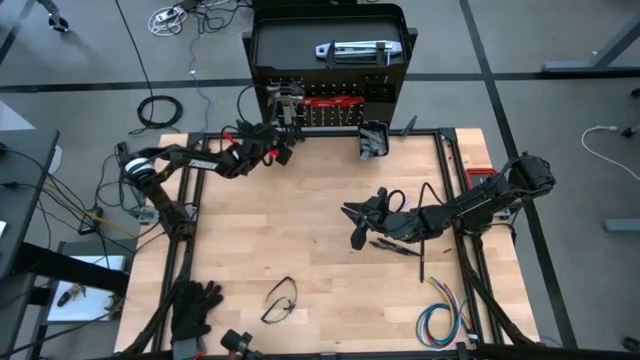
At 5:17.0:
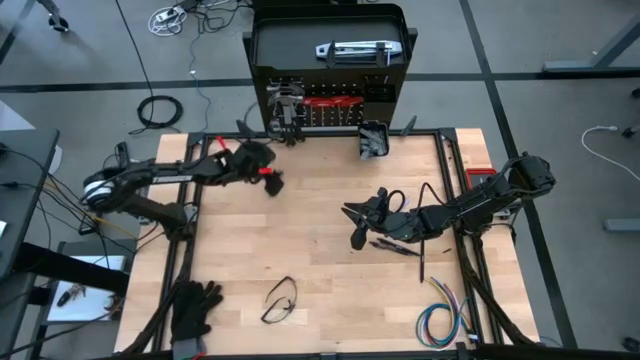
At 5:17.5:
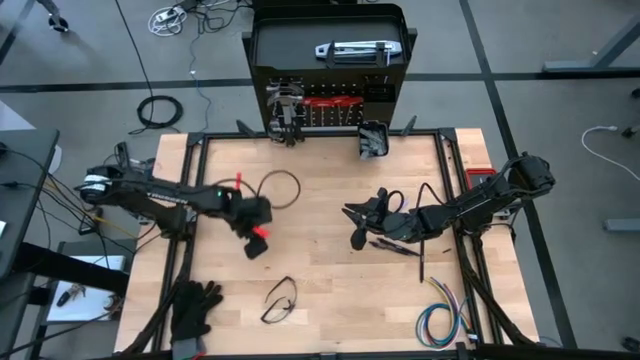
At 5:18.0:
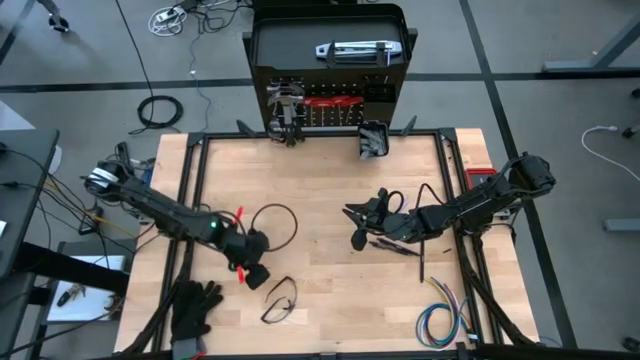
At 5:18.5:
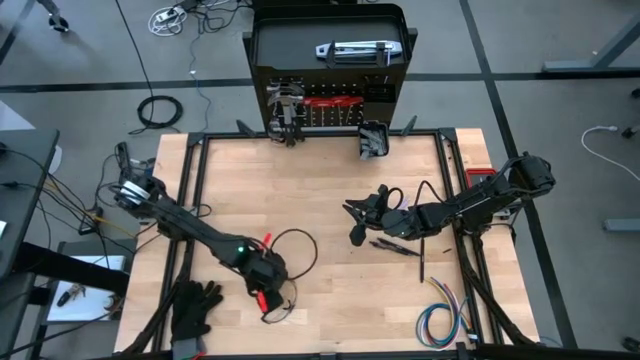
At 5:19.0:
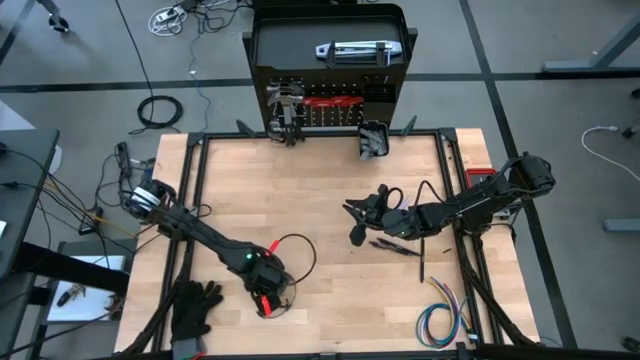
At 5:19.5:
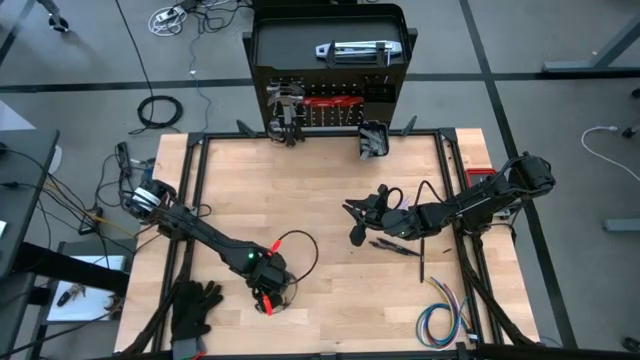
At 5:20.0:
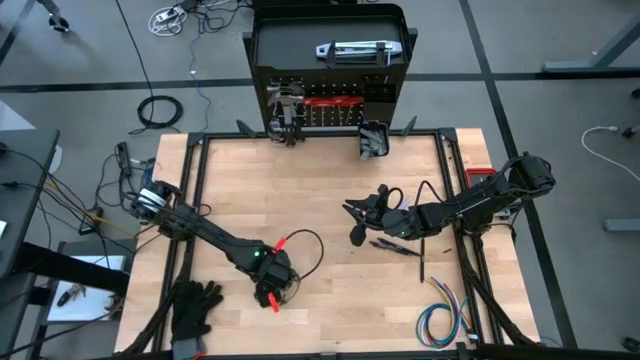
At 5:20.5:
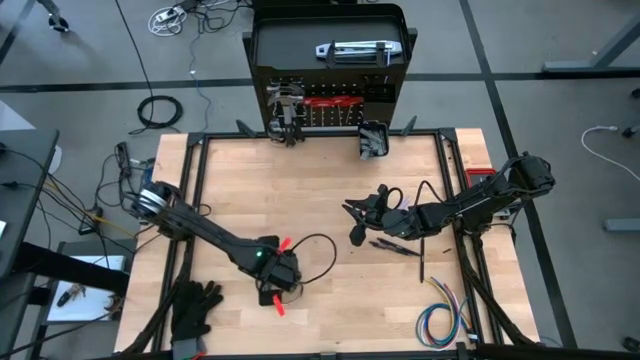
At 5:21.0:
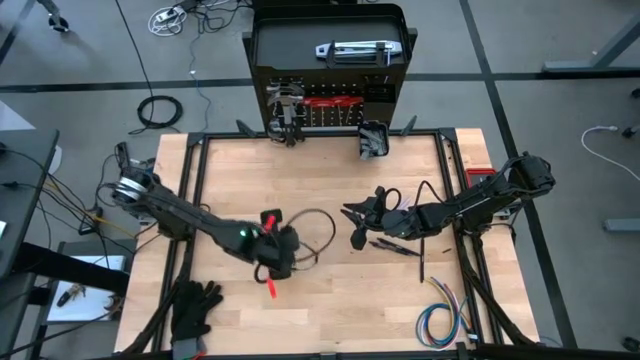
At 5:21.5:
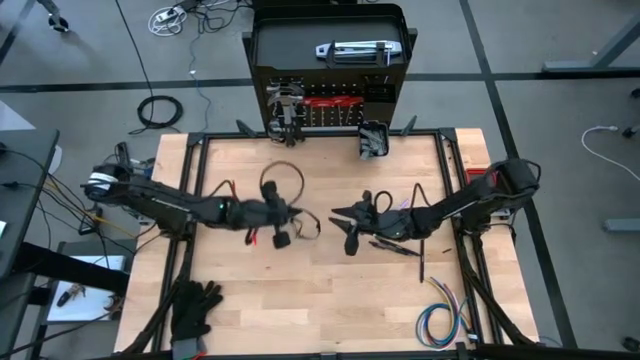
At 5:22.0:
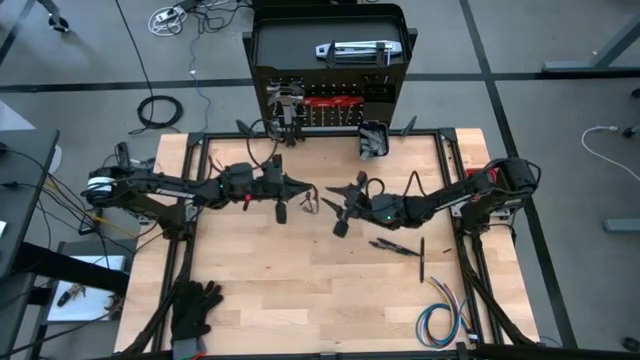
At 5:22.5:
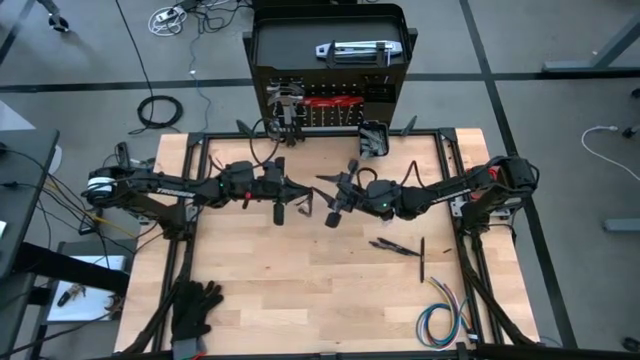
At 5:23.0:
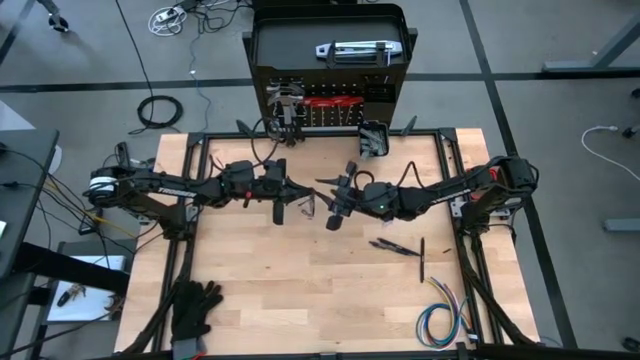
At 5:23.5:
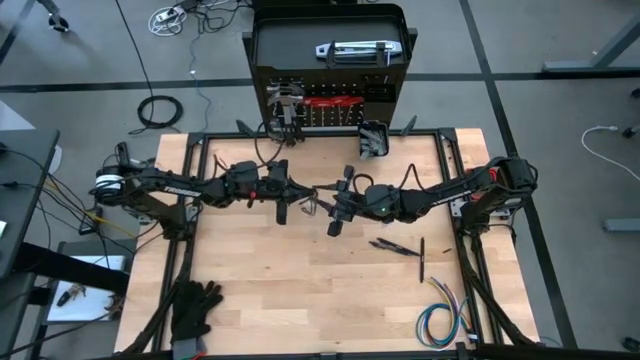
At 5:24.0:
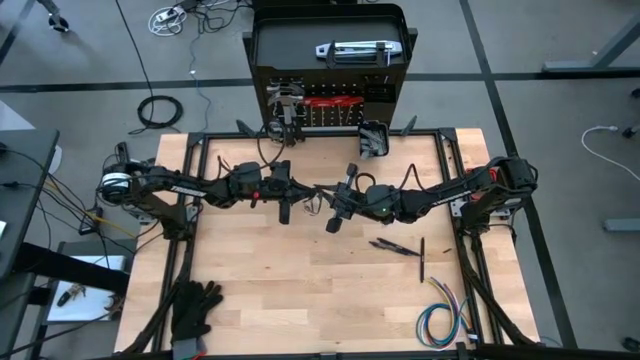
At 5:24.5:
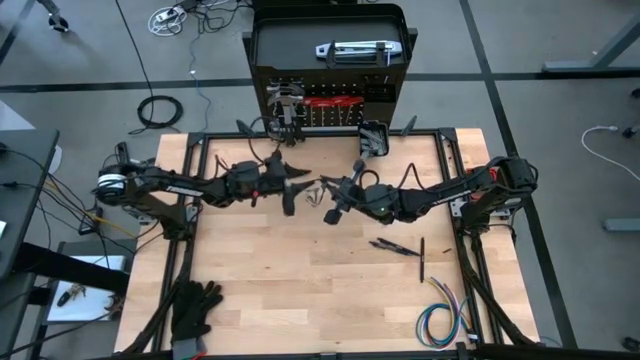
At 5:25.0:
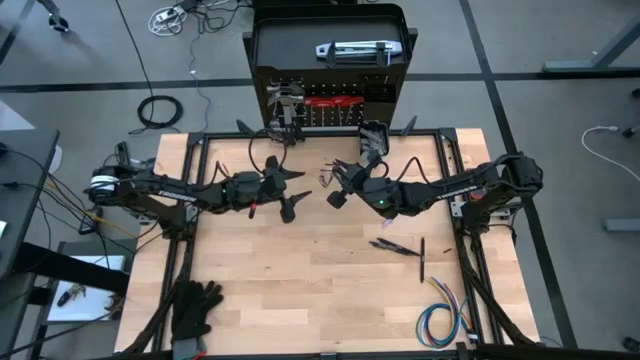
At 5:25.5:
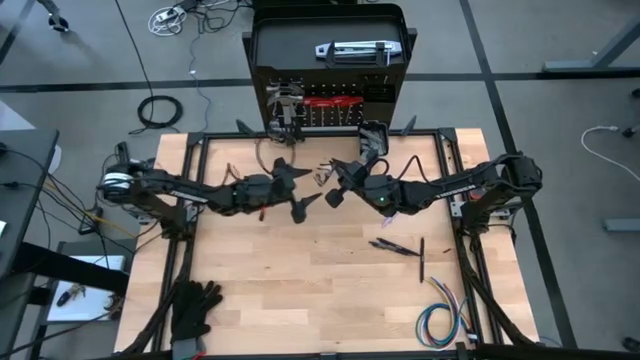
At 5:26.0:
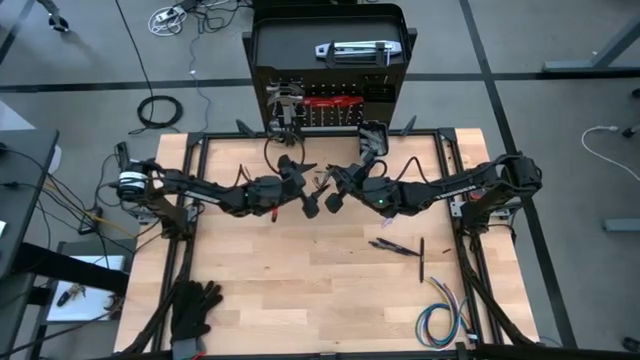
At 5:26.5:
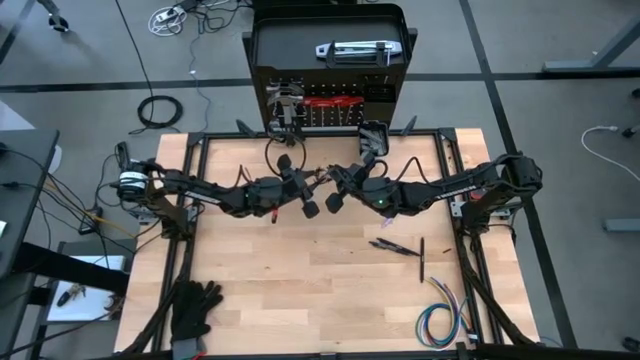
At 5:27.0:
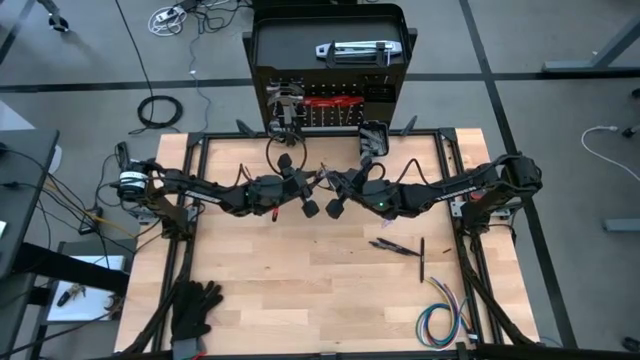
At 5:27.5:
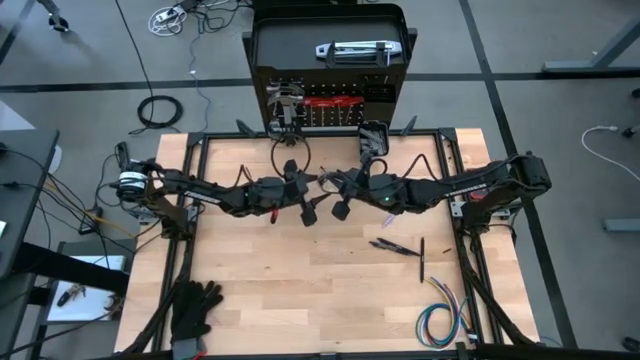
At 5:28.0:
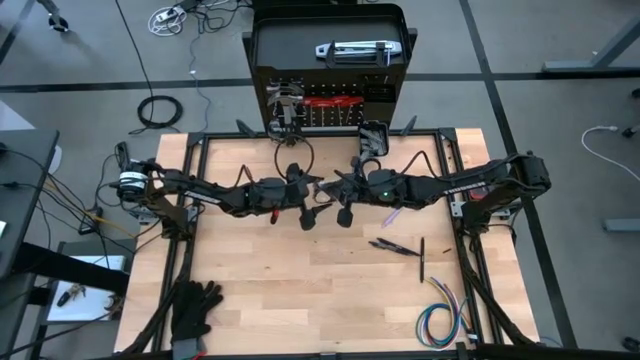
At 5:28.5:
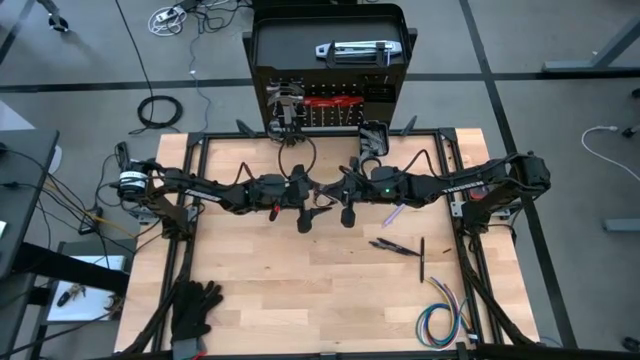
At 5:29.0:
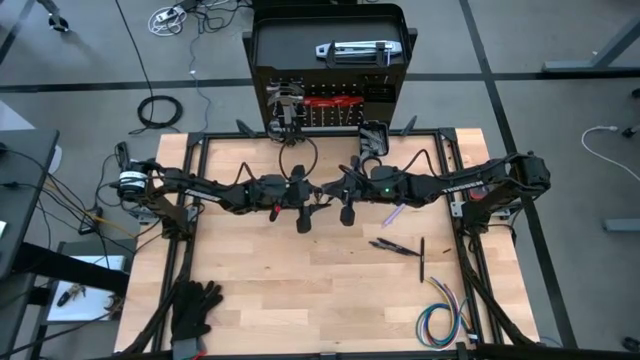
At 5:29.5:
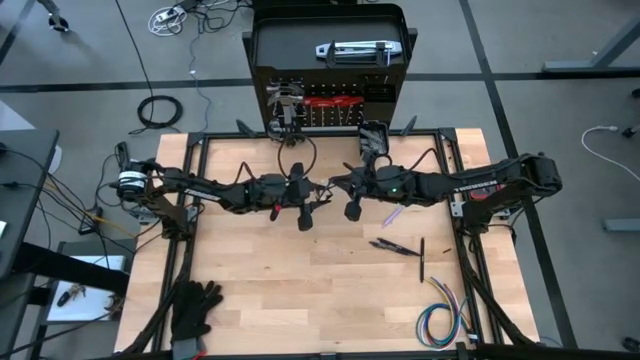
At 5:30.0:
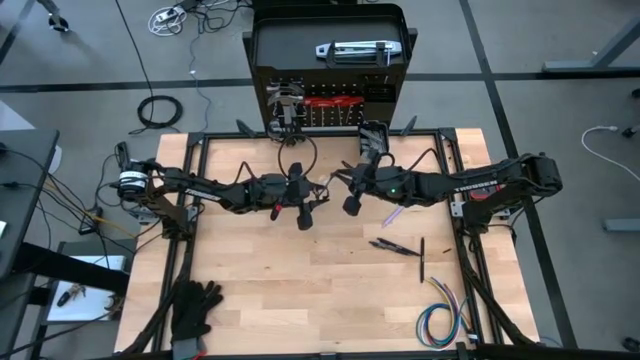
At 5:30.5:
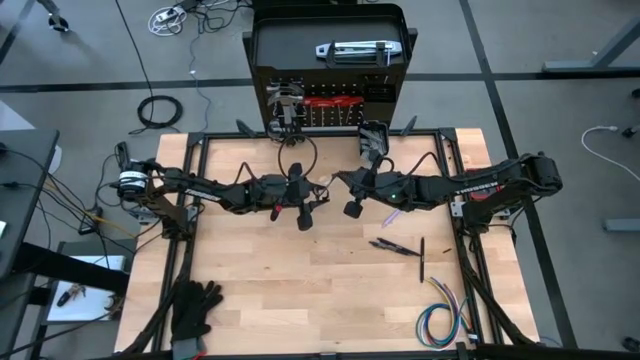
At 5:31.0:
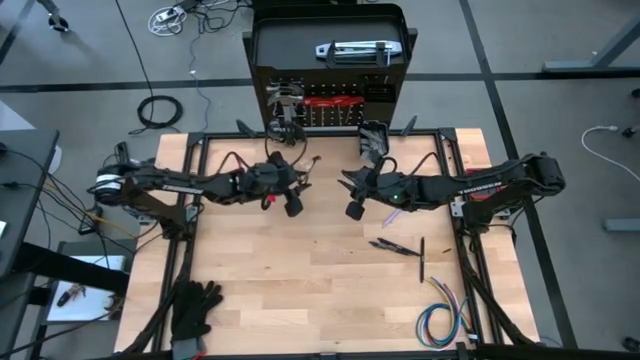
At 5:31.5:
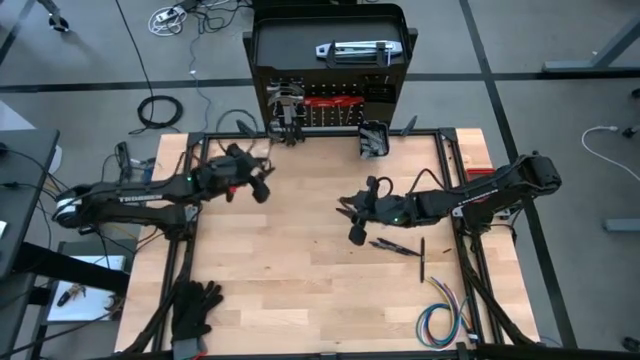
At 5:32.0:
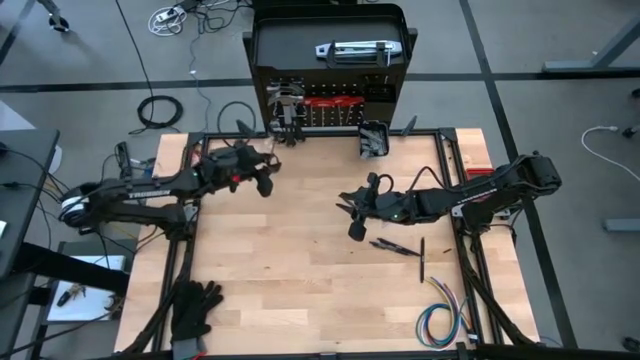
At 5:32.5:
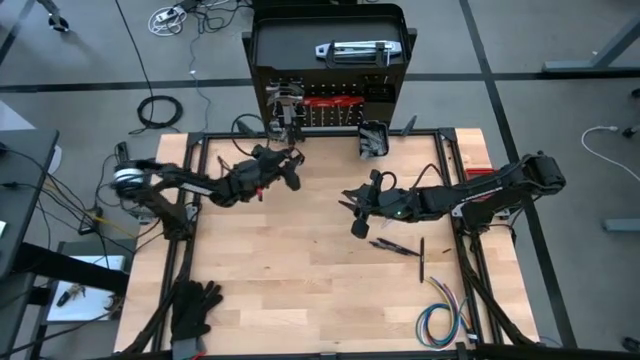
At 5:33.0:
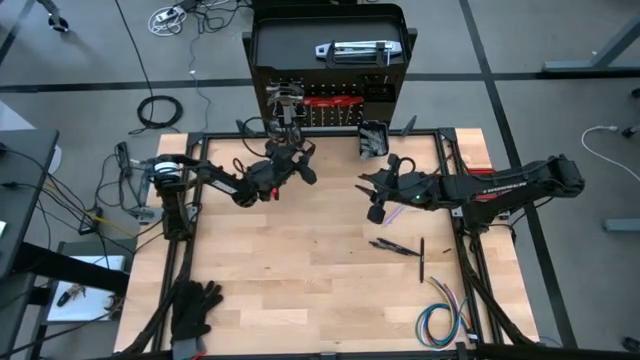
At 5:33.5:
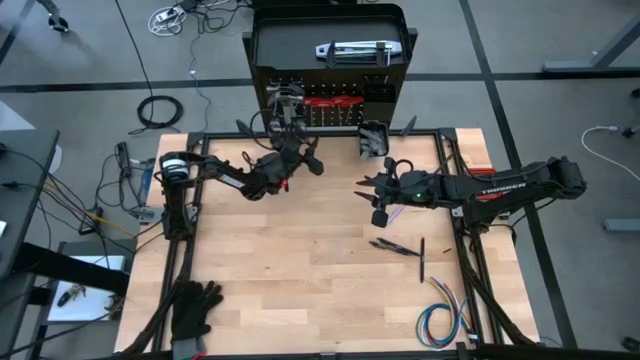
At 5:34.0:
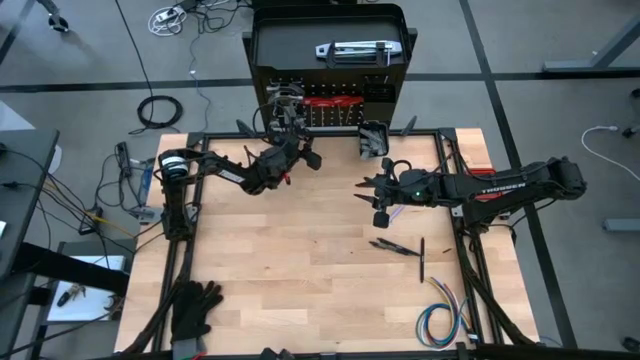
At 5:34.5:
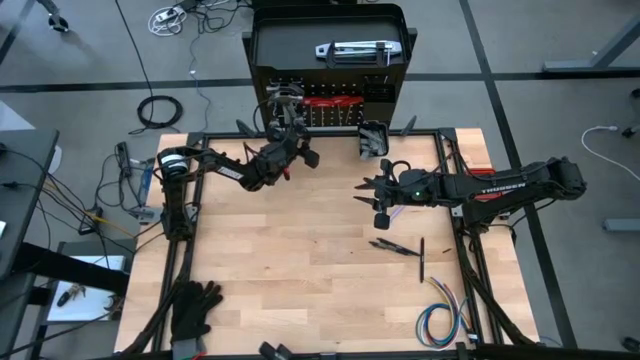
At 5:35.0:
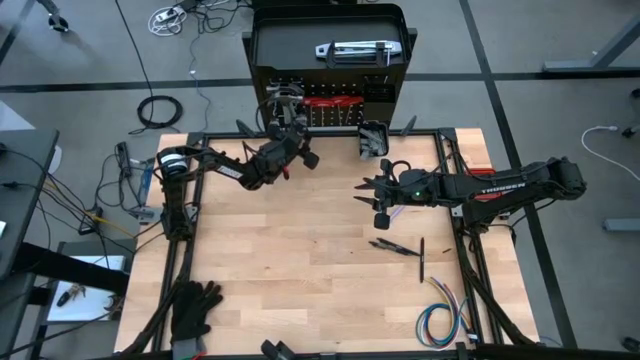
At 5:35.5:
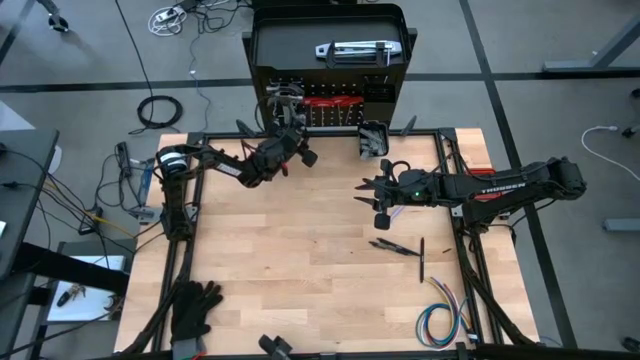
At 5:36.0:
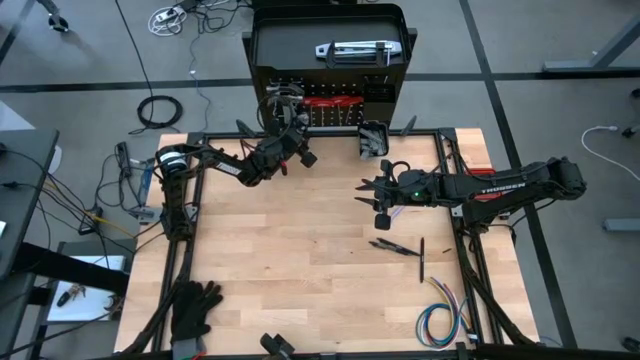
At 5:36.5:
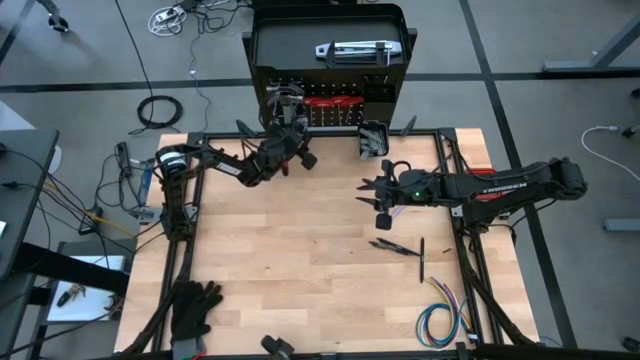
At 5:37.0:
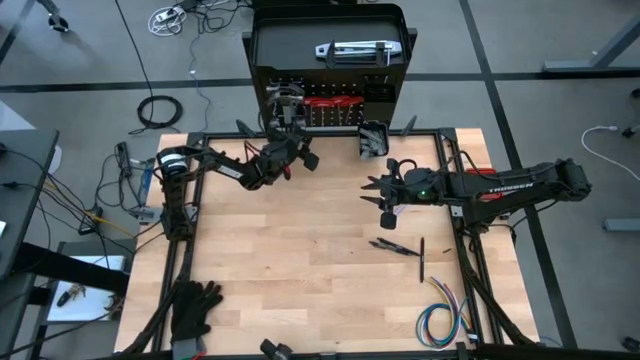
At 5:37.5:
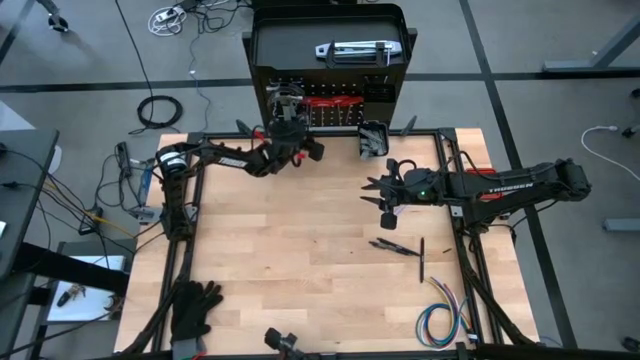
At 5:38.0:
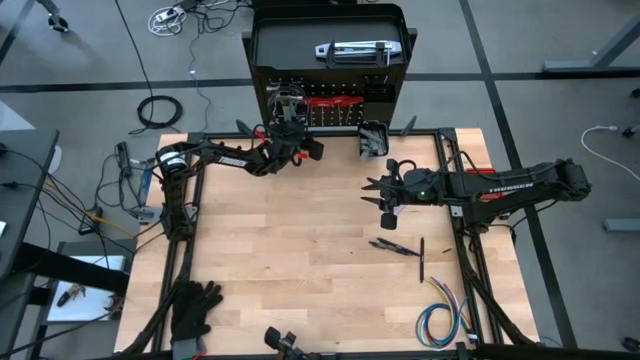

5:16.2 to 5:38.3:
Task: Hang tools onto peg board
Hang the glasses on the pegboard
